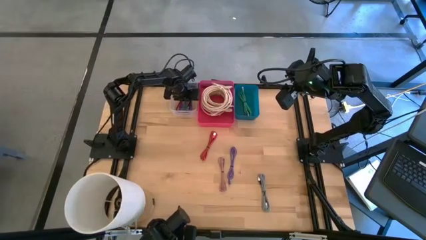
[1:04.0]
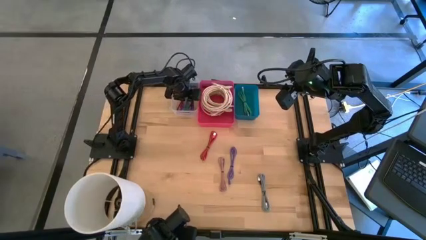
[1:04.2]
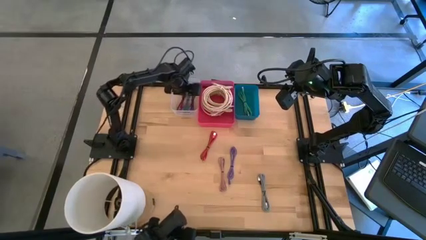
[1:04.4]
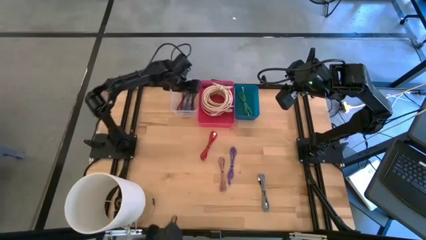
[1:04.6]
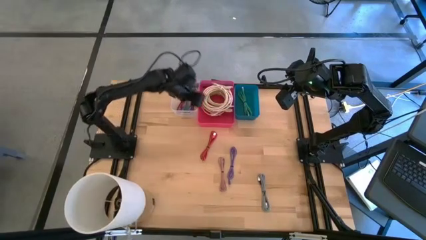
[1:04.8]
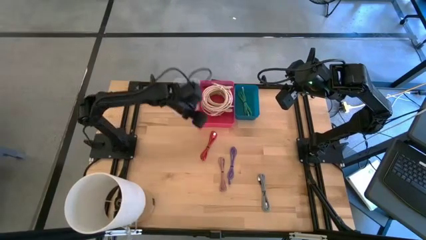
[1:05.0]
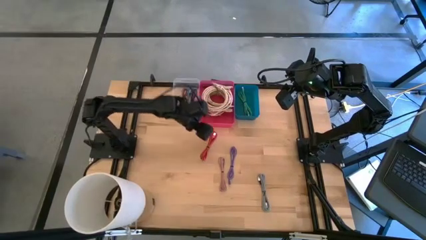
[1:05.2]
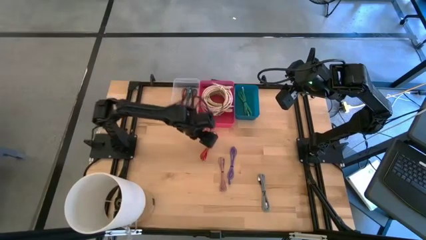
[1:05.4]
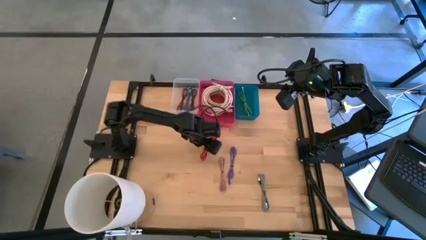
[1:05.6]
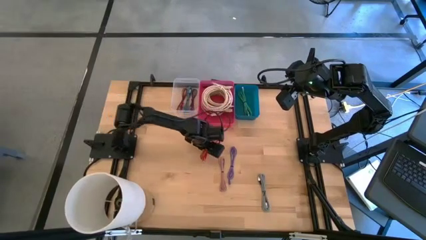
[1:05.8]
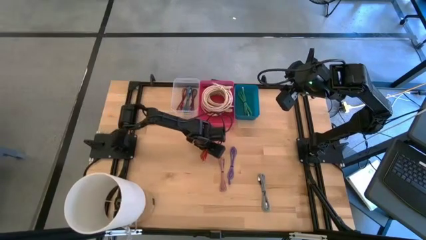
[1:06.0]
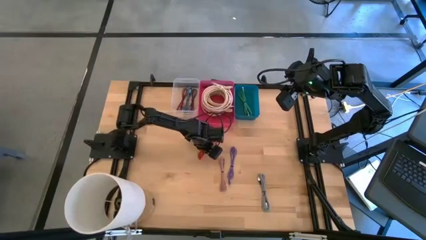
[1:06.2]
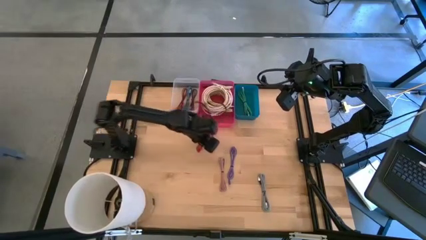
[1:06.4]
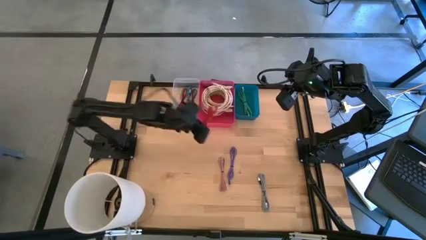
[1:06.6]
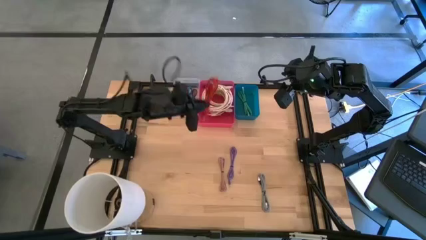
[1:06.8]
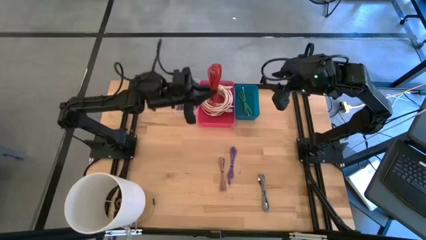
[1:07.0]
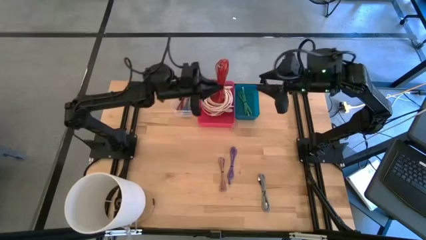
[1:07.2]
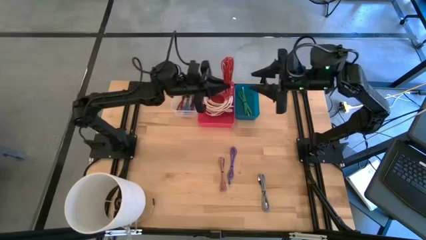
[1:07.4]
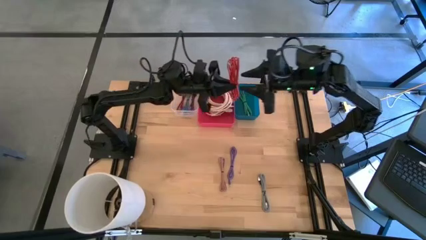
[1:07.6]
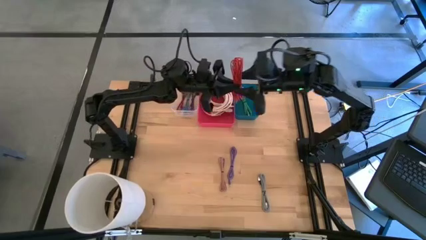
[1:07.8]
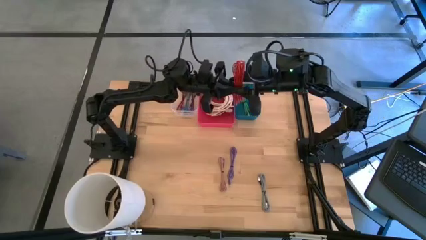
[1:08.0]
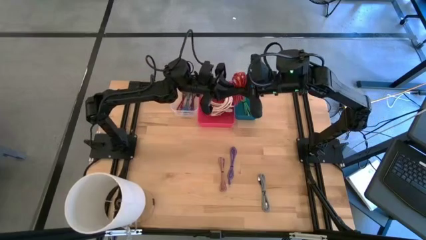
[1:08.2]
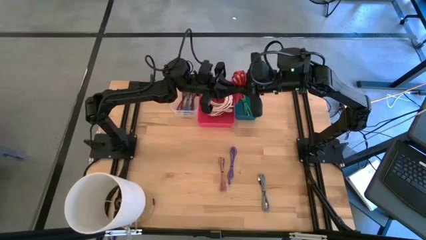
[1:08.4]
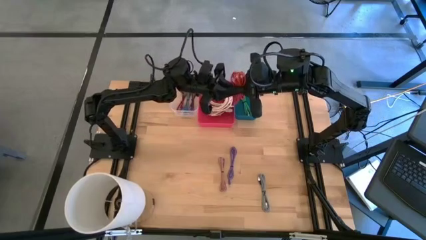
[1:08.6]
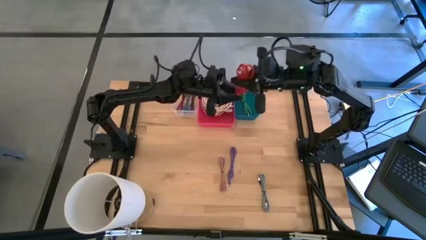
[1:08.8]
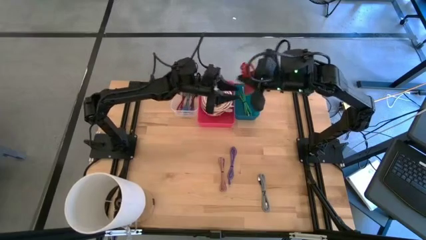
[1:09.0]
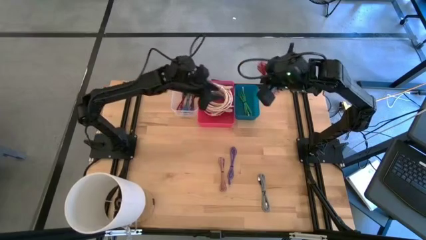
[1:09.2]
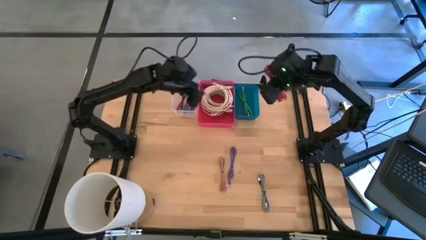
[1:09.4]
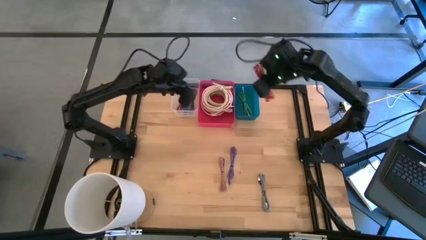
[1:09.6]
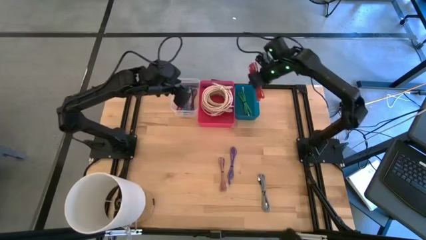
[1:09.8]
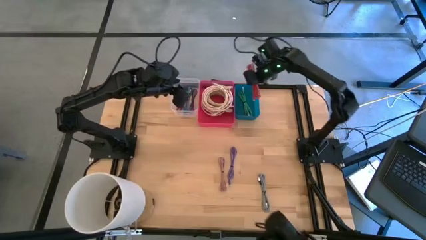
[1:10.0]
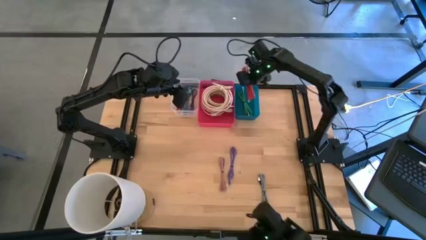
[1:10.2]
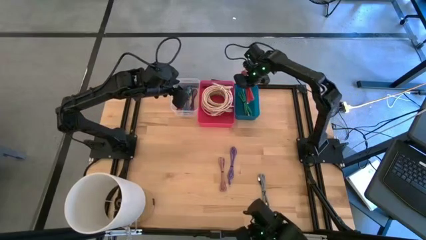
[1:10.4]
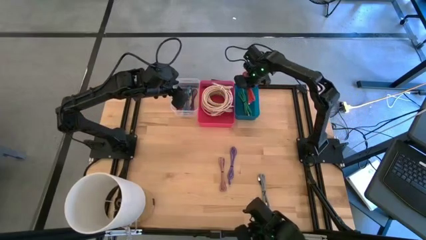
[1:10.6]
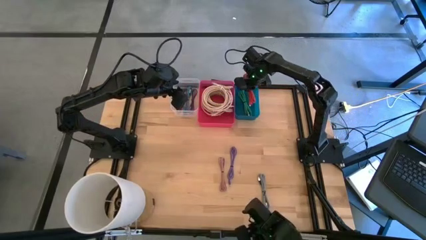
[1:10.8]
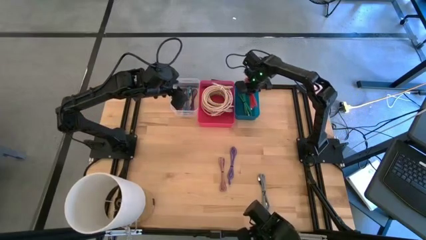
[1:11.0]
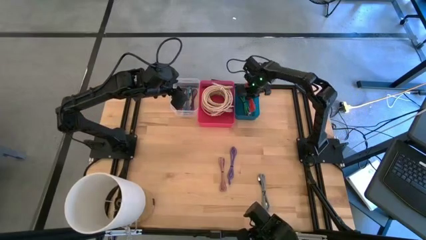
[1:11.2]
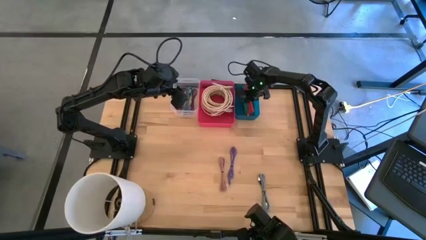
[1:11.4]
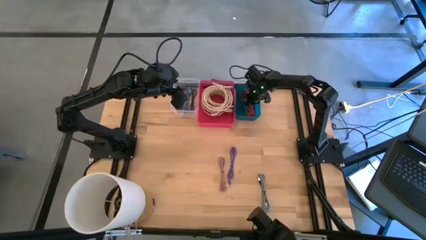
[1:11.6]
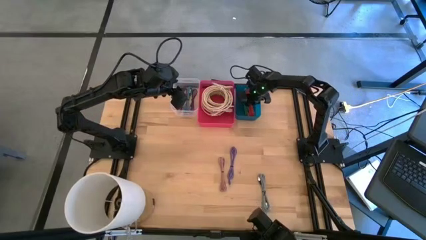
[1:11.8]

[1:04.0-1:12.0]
Task: Pick & Place USB Port
Put the orange charger cable into the blue bin

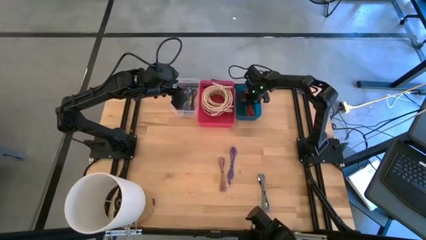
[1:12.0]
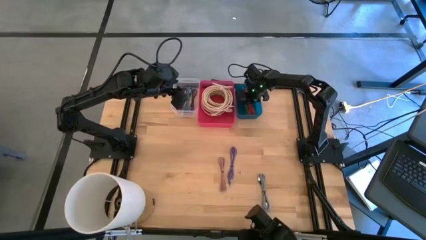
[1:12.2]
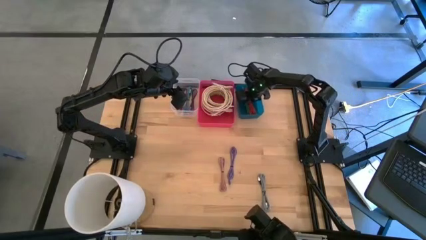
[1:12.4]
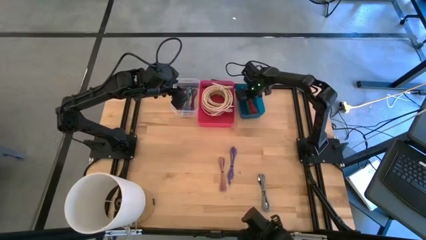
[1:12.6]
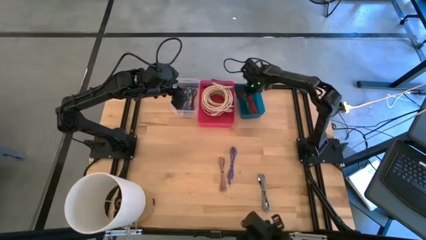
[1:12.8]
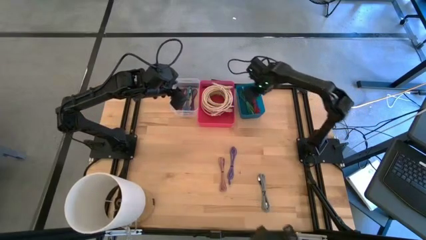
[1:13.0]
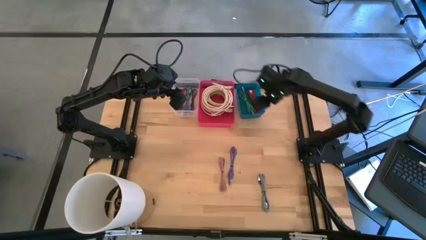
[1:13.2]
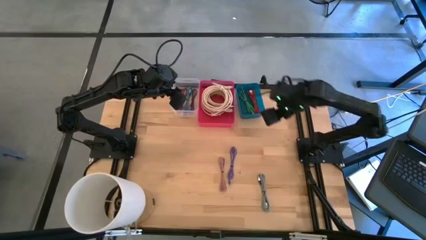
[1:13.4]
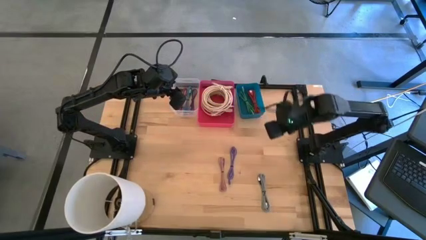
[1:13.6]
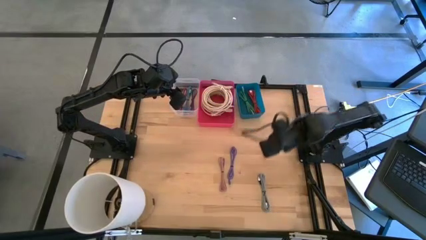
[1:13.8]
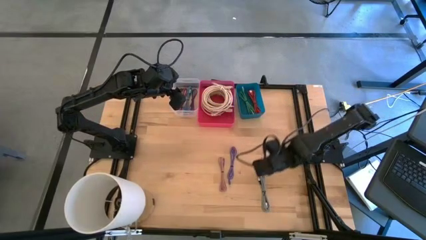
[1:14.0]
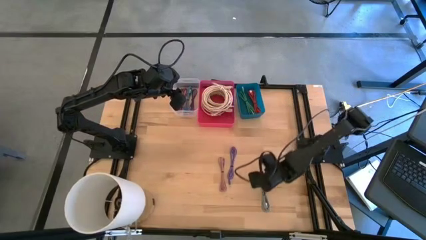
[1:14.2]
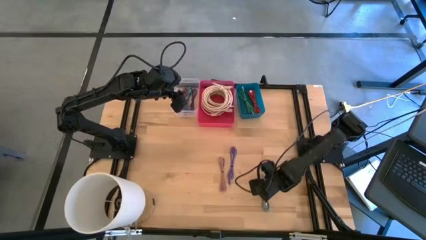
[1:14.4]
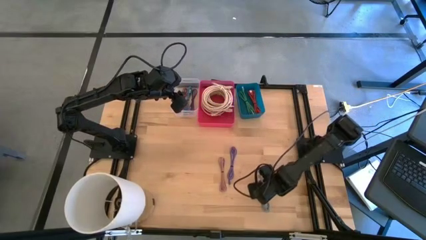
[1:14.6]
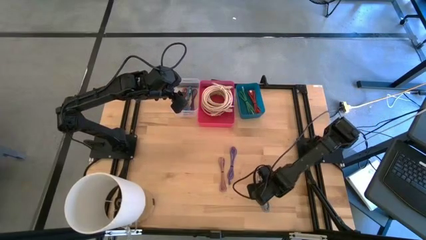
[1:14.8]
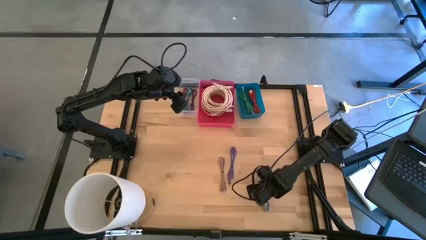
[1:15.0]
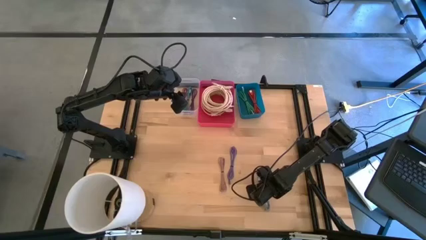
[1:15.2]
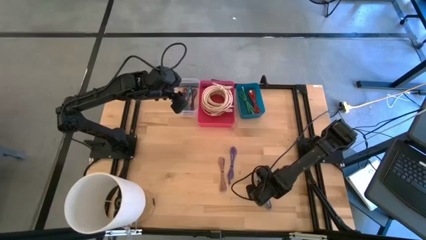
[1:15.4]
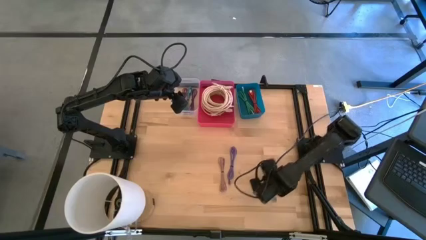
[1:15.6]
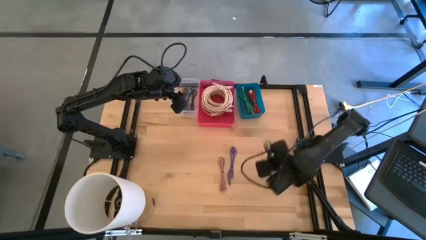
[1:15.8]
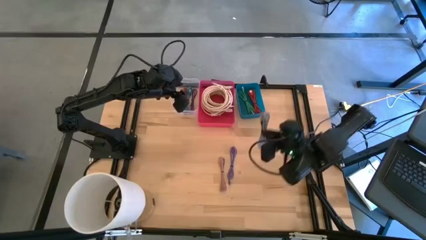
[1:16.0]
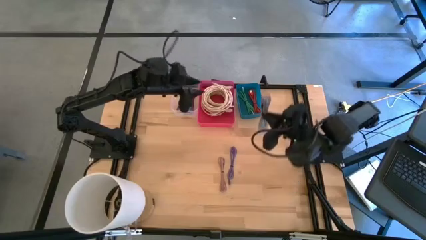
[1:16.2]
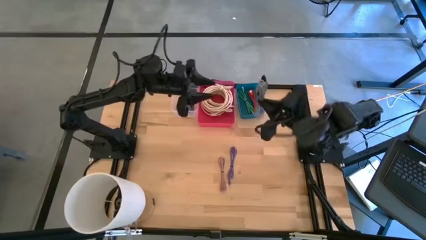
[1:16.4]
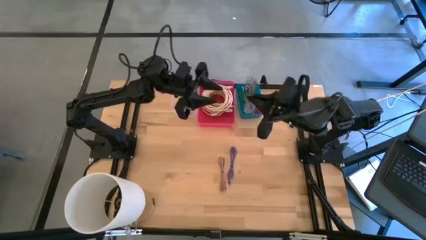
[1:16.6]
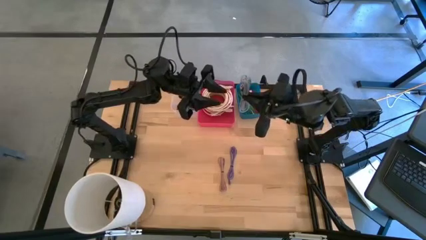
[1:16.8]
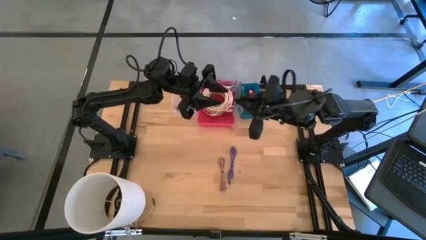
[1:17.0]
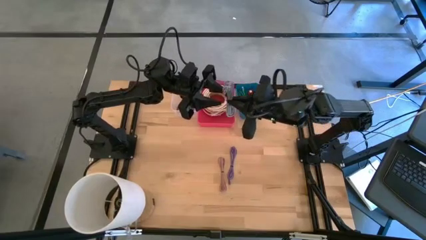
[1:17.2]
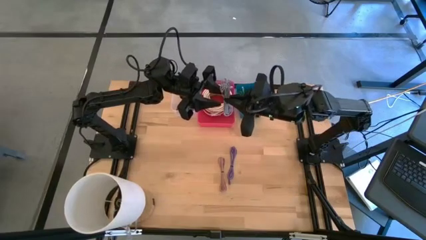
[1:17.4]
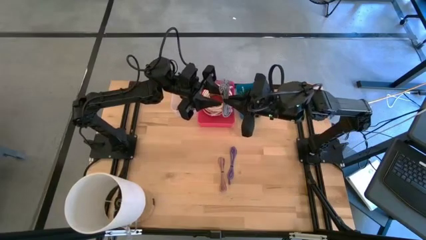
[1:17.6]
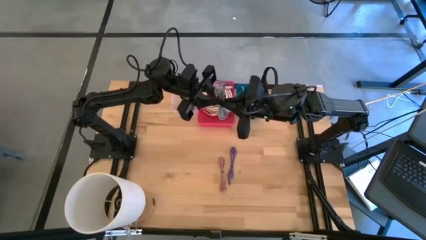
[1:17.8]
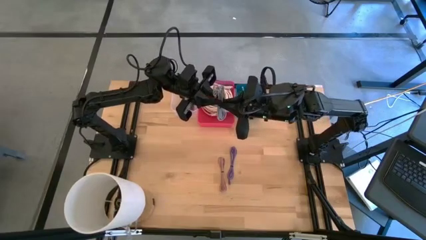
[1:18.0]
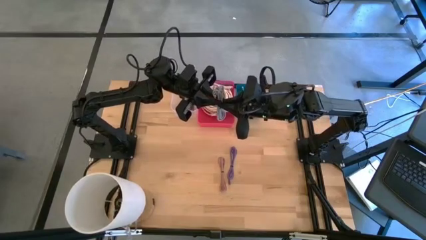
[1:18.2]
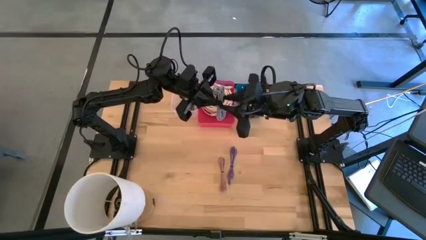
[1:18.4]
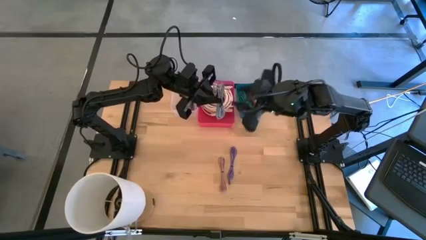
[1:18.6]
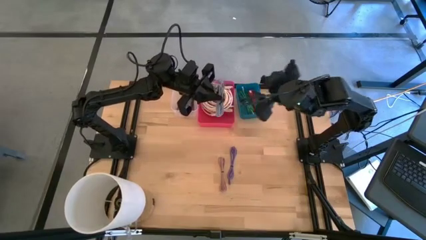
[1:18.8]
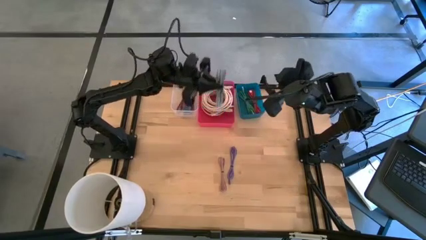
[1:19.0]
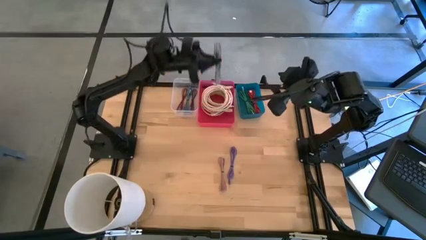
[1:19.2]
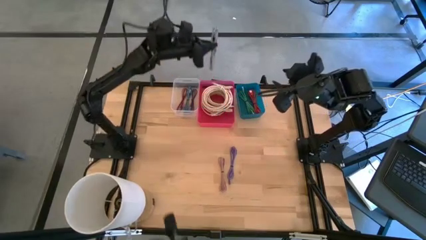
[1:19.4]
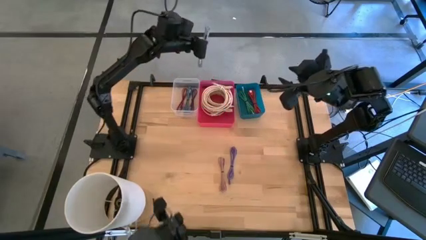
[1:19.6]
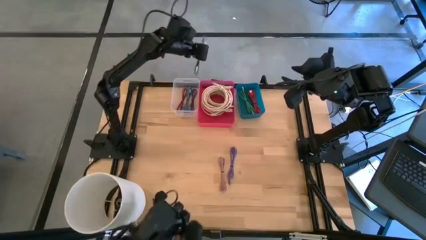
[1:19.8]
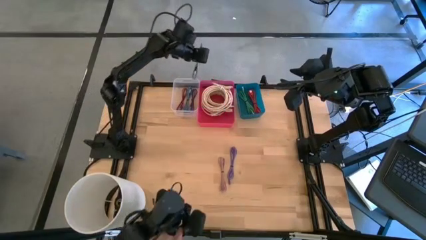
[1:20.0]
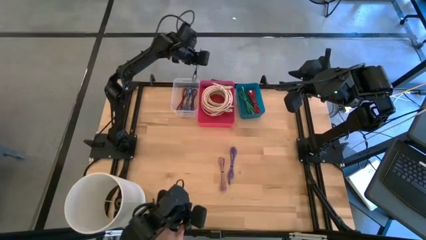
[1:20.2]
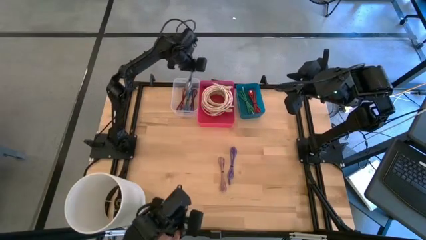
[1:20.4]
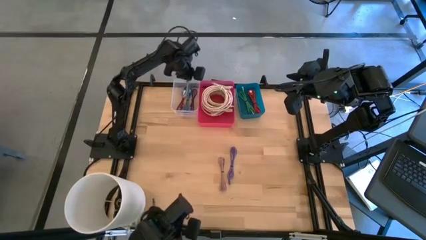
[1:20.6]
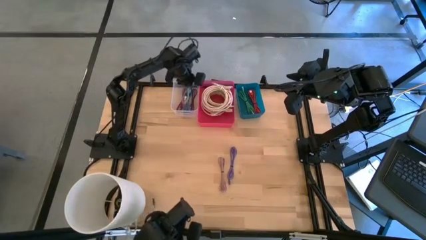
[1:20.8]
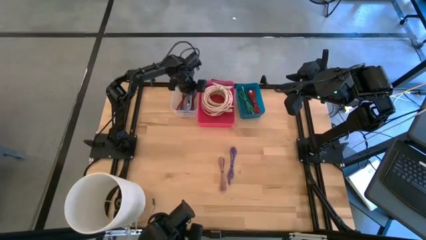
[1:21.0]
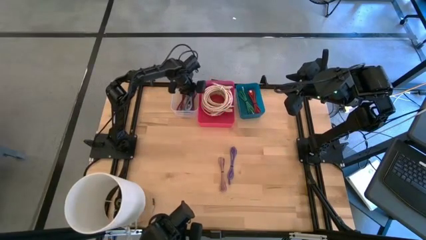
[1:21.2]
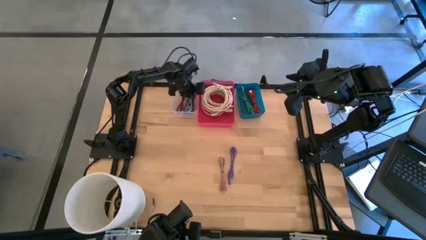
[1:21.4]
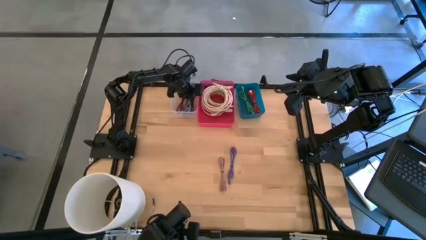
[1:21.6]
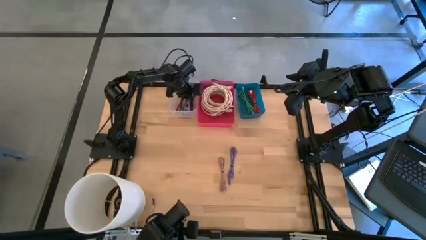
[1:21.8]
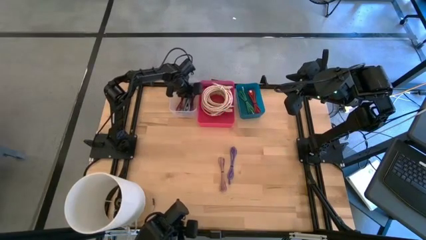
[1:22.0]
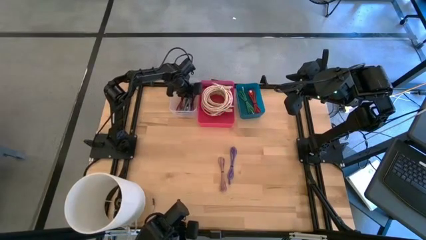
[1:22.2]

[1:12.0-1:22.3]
Put the white charger cable into the transparent bin
